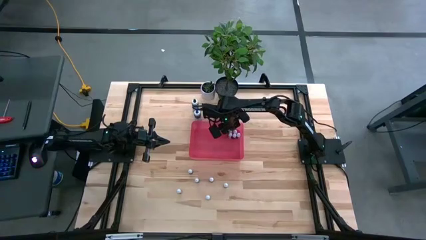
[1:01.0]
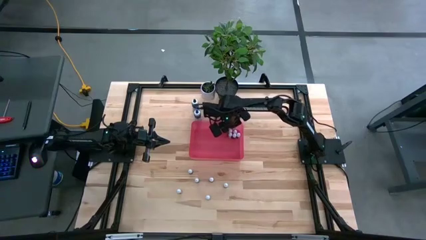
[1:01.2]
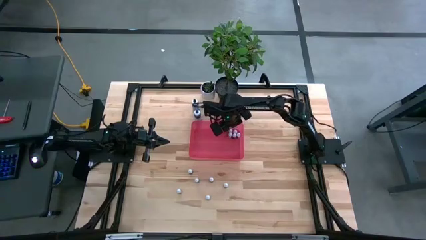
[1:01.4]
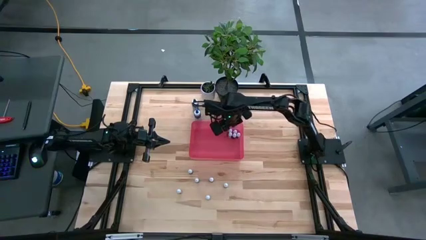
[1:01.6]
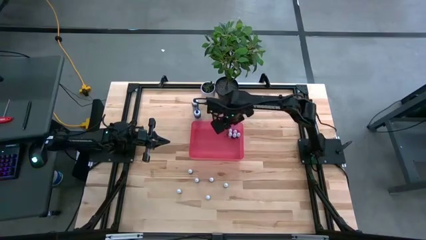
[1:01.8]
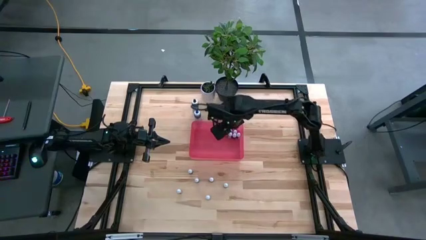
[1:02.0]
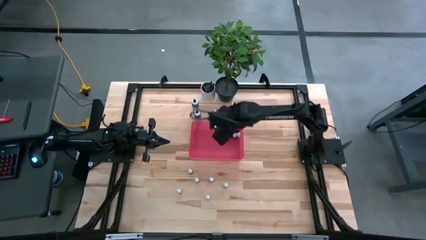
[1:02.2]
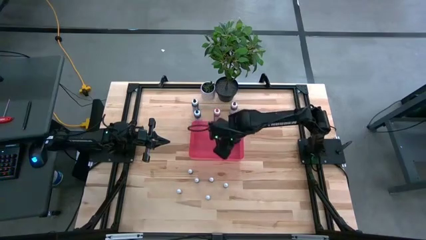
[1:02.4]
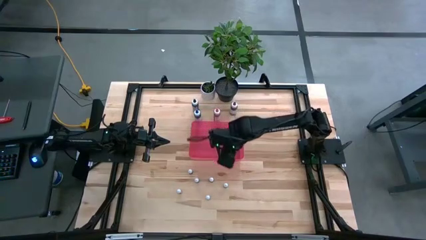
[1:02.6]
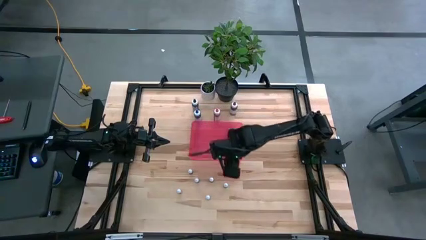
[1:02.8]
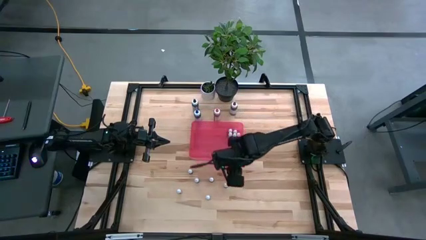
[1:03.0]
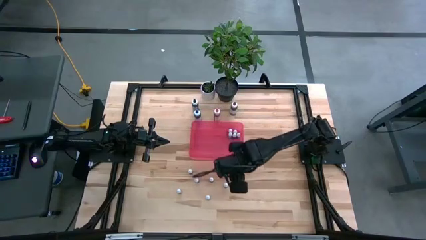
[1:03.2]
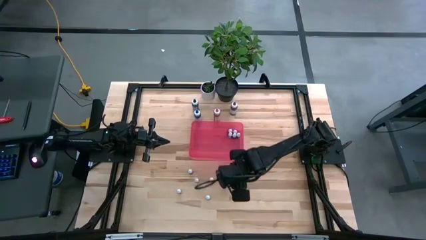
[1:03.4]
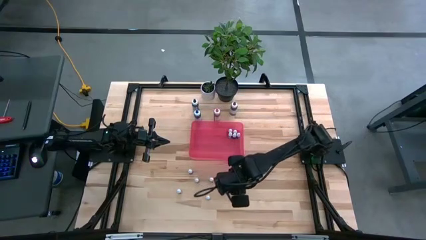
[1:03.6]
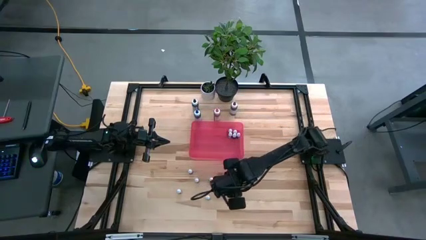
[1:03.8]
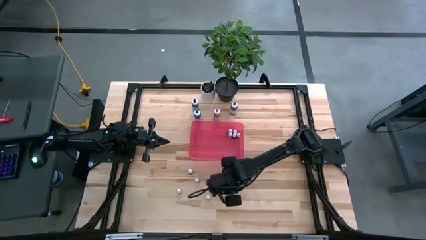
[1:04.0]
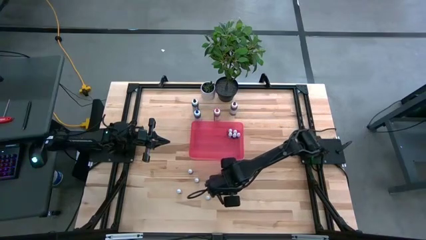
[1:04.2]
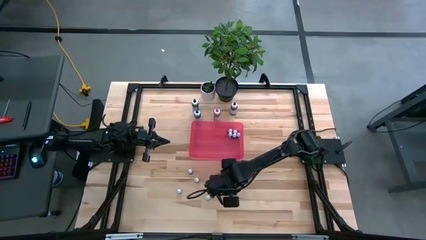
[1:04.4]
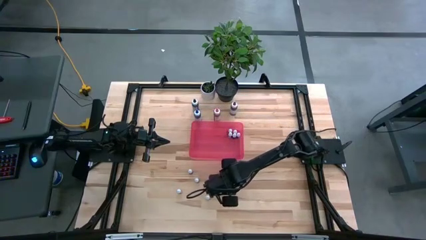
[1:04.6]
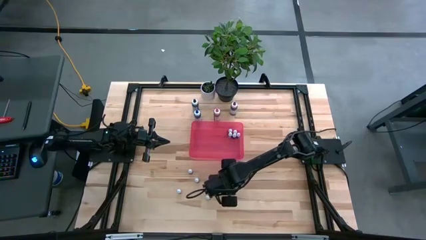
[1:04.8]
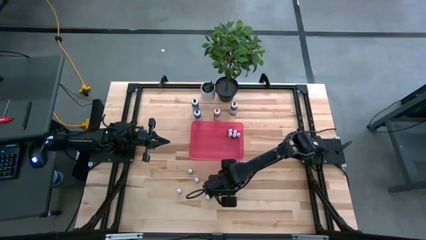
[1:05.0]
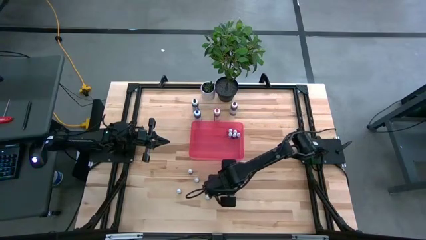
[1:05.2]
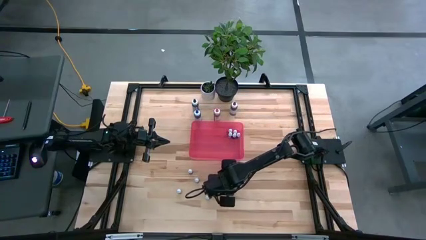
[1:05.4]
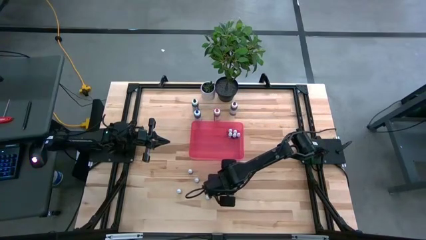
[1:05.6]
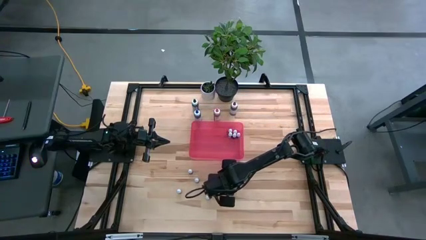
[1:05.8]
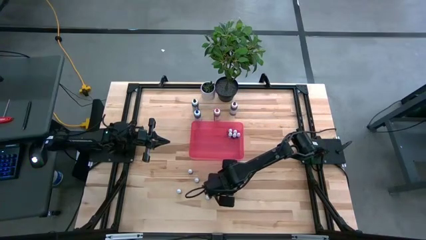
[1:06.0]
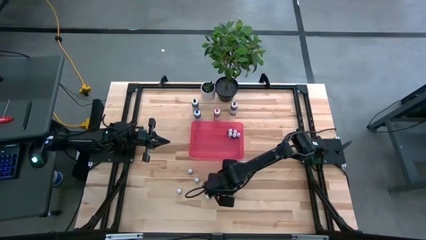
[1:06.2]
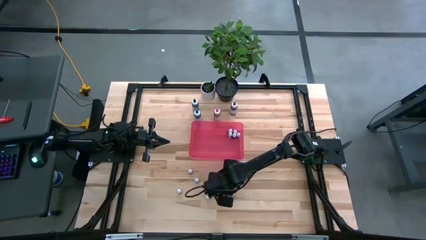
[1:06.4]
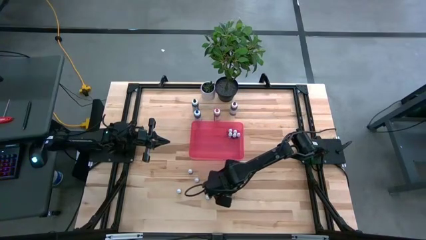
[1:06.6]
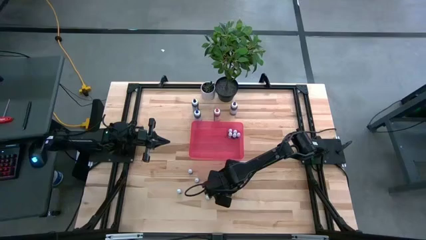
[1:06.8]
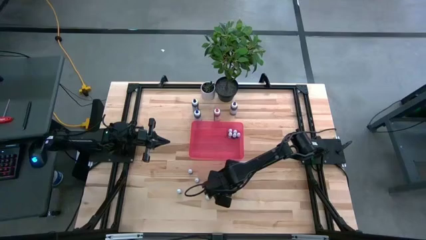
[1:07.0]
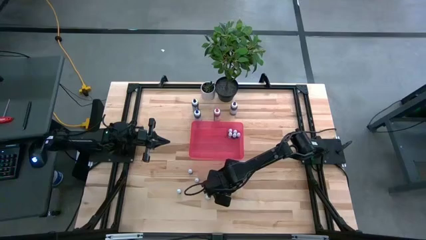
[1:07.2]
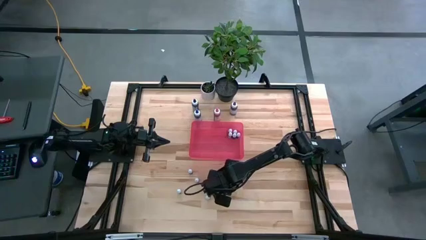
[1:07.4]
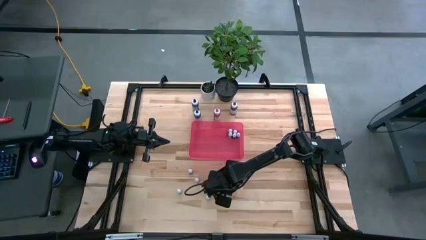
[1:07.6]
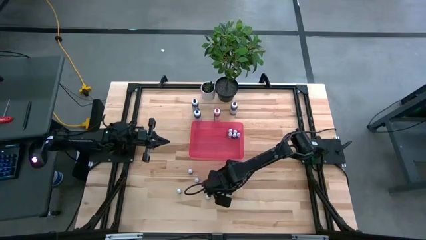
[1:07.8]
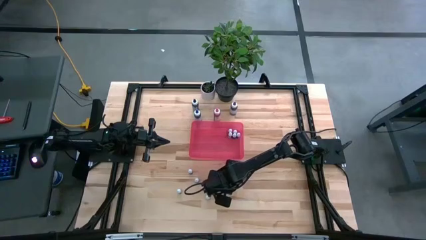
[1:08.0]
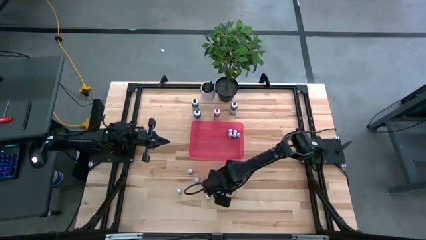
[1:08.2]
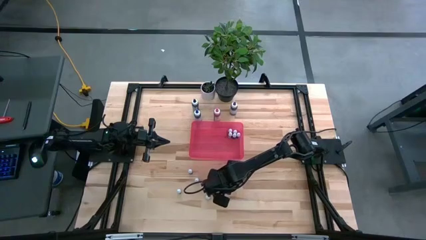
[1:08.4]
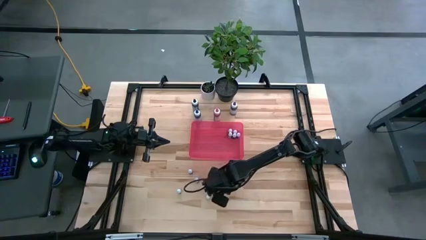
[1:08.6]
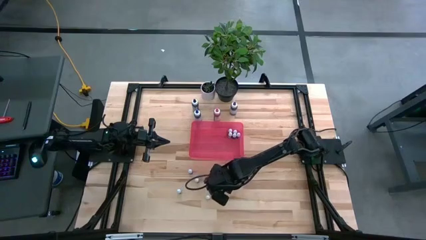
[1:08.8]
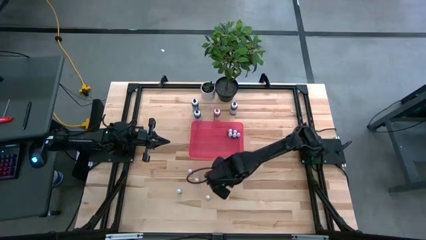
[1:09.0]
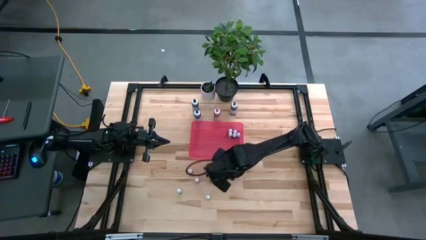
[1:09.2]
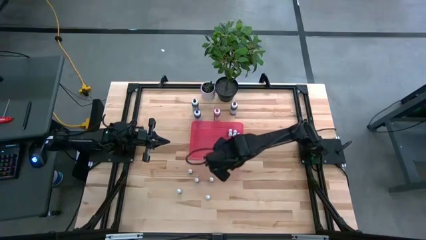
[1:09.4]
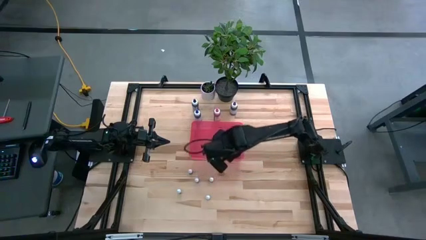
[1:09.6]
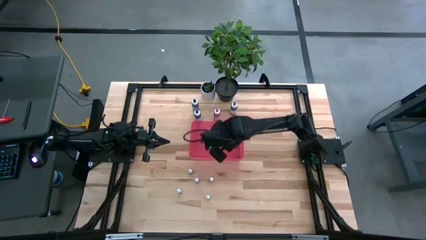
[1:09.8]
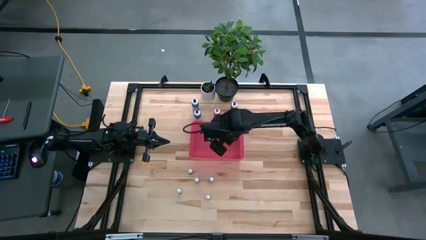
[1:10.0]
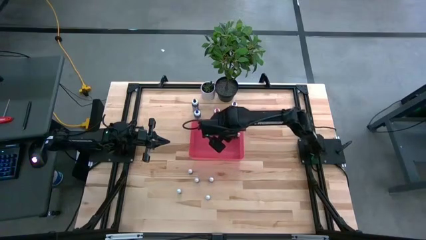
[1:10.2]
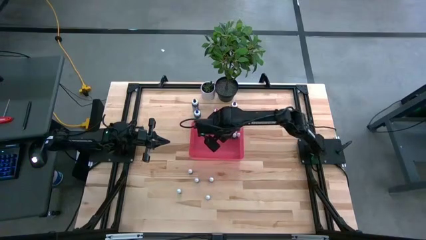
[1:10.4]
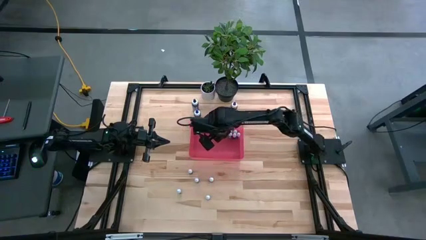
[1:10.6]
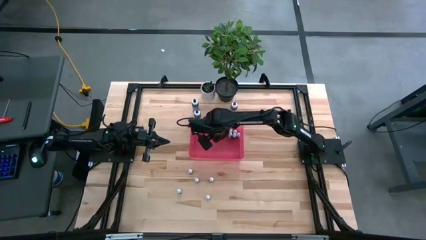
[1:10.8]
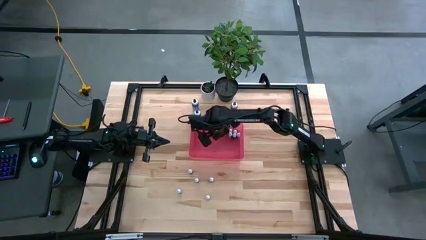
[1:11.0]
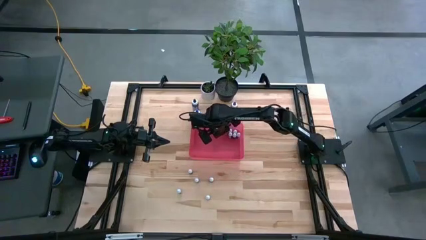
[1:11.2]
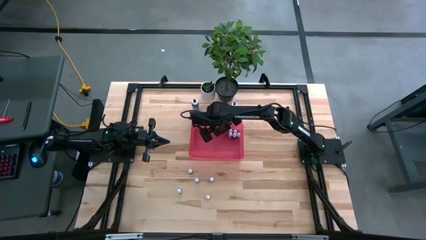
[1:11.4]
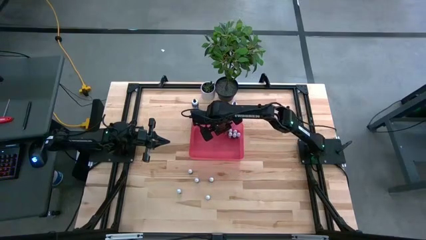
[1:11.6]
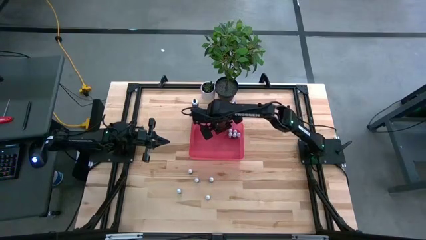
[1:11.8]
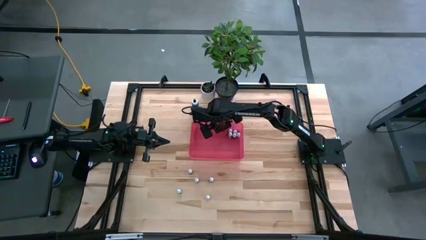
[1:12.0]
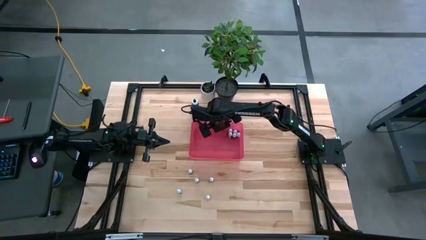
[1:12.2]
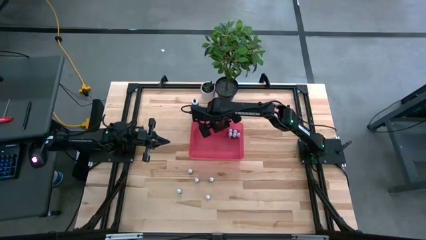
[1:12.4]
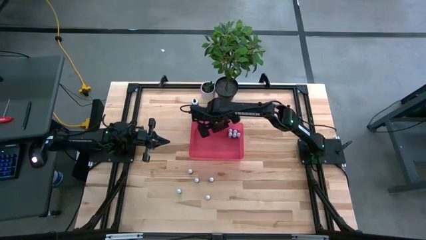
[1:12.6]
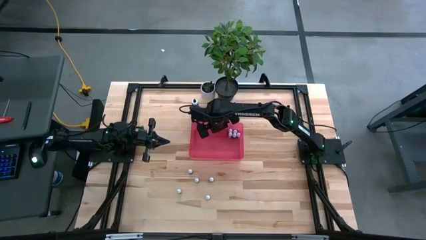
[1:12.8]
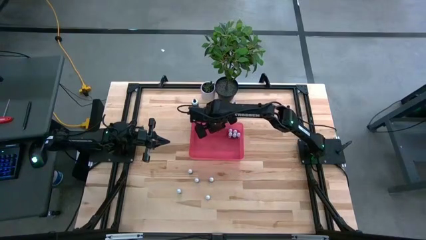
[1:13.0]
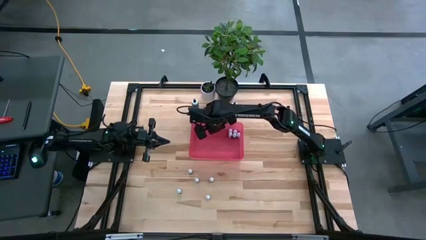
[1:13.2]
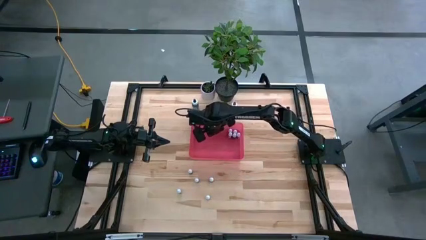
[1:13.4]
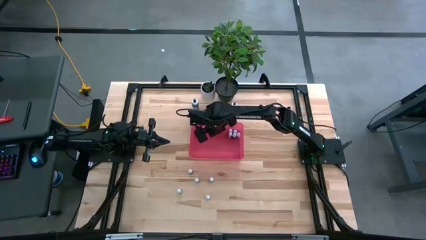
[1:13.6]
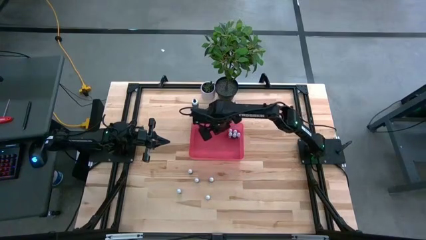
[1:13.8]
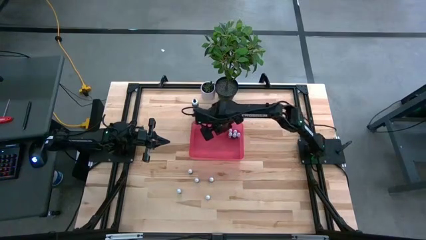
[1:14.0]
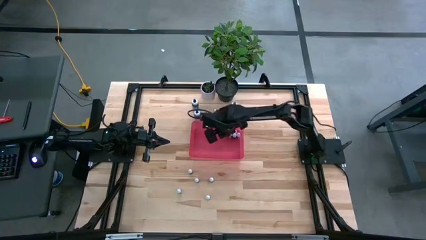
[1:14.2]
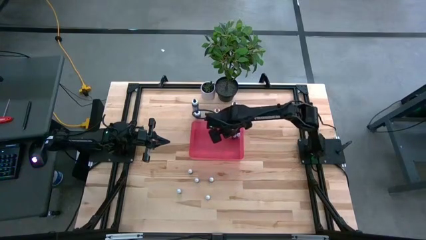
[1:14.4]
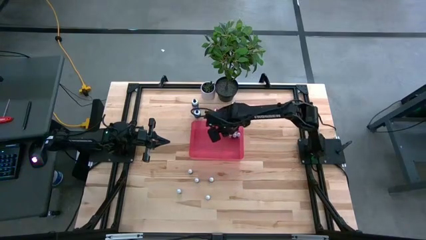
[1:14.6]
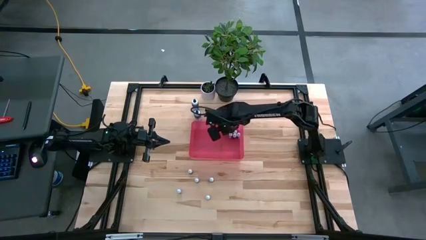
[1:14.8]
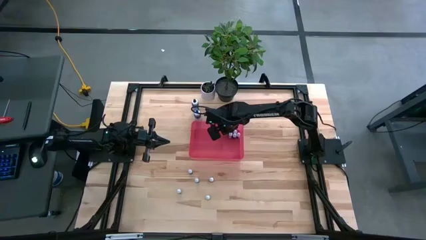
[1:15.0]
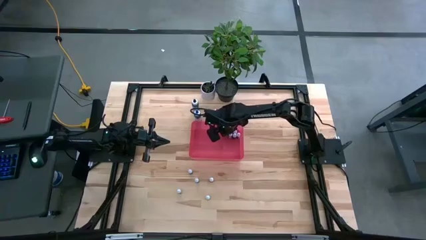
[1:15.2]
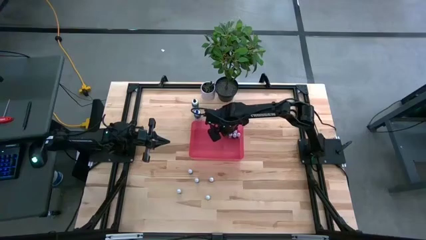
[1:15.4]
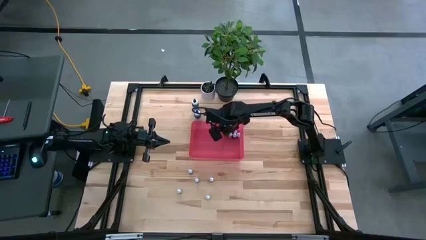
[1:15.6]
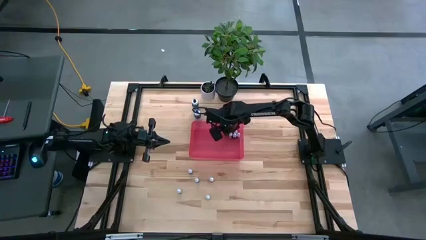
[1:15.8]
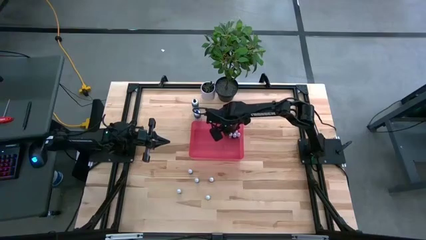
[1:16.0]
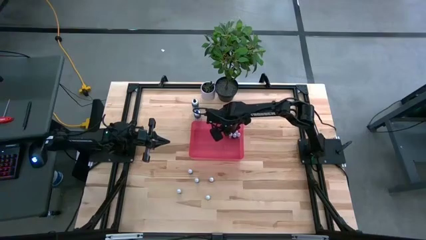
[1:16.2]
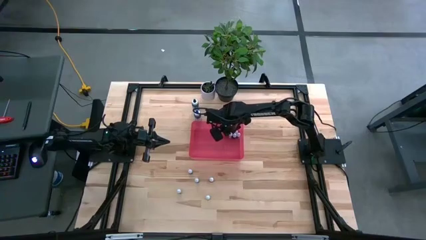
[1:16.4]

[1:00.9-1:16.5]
Task: Pick & Place food coloring
Put the small red food coloring bottle into the pink container
